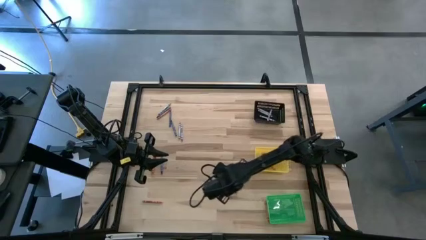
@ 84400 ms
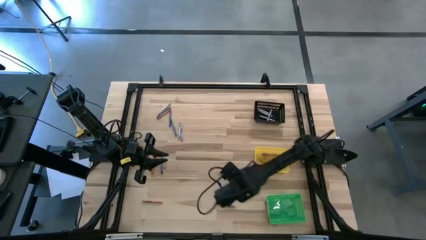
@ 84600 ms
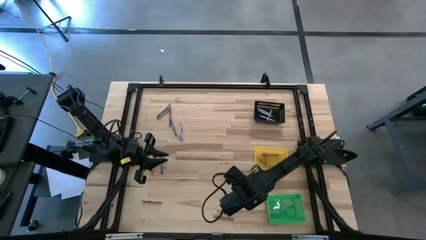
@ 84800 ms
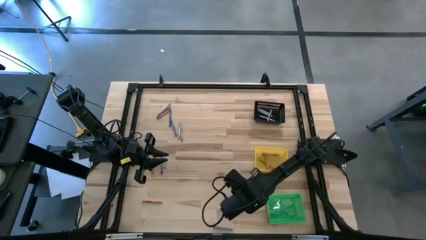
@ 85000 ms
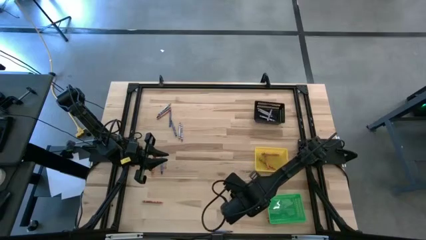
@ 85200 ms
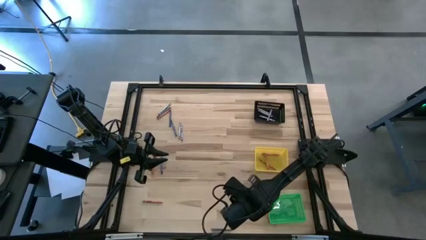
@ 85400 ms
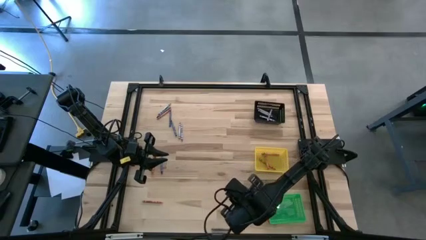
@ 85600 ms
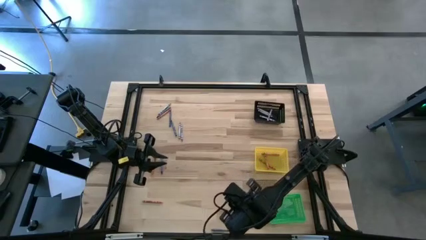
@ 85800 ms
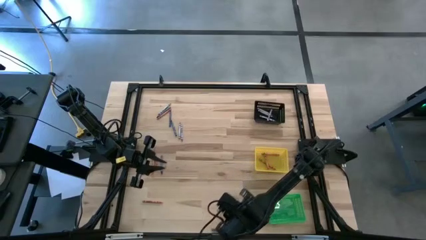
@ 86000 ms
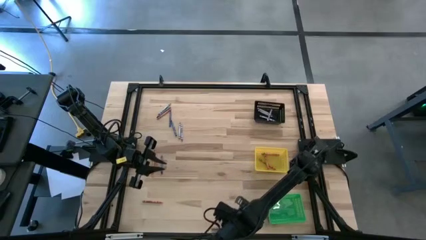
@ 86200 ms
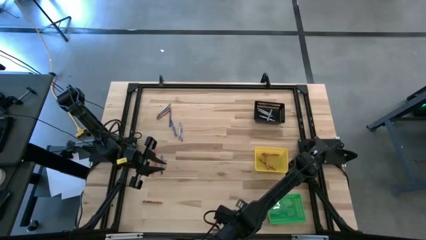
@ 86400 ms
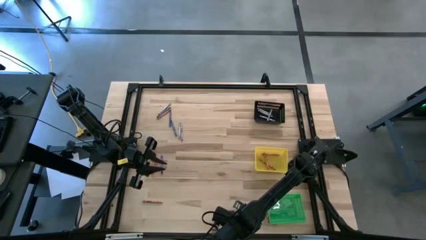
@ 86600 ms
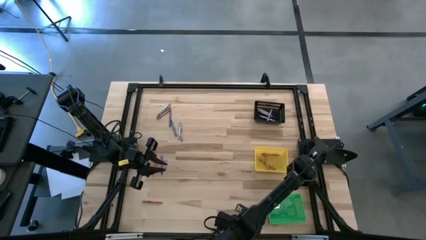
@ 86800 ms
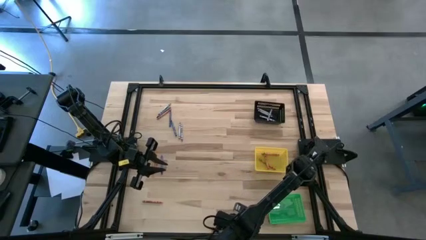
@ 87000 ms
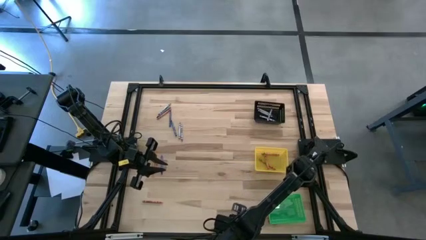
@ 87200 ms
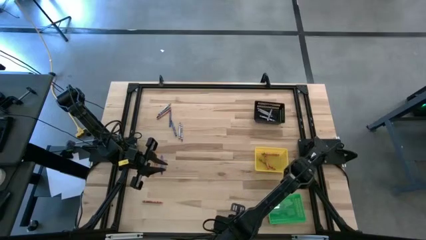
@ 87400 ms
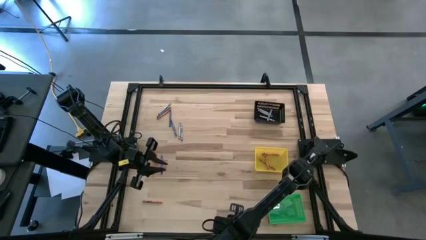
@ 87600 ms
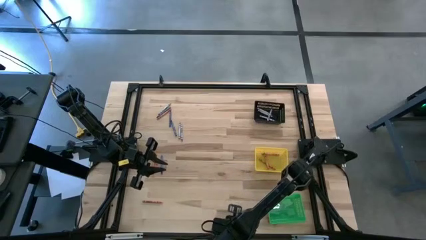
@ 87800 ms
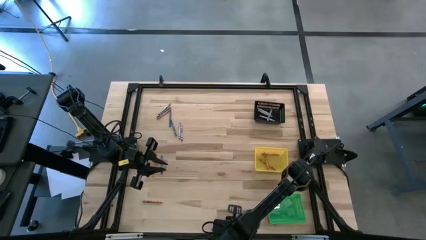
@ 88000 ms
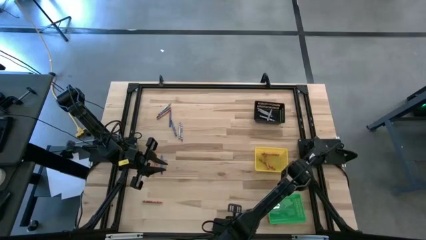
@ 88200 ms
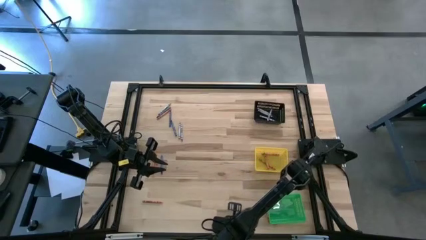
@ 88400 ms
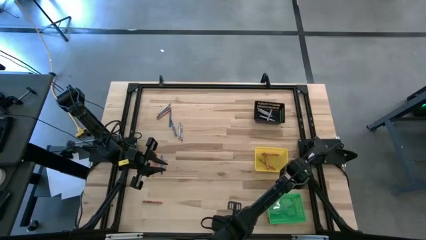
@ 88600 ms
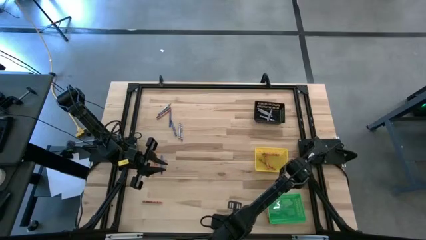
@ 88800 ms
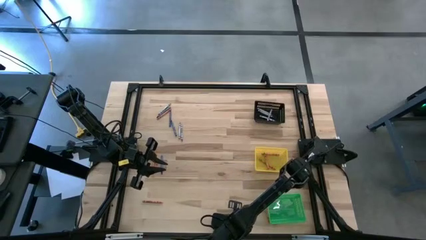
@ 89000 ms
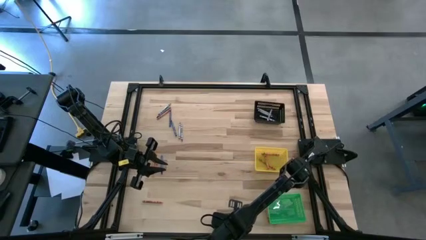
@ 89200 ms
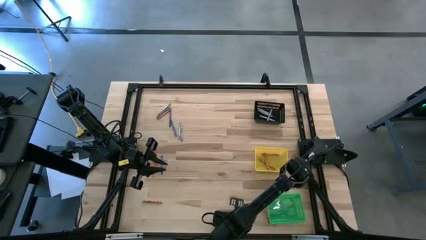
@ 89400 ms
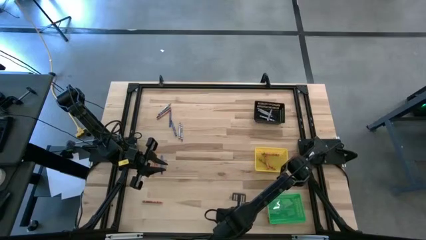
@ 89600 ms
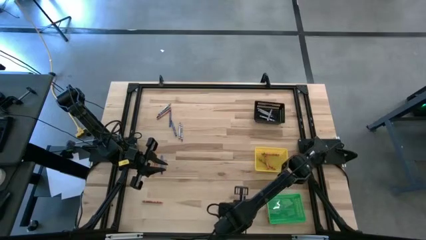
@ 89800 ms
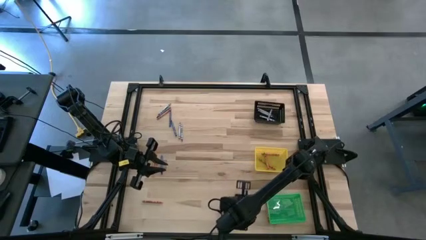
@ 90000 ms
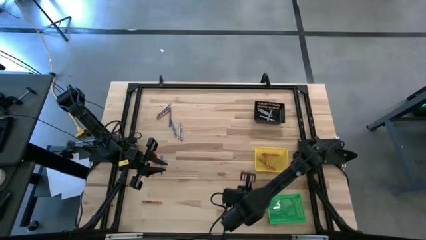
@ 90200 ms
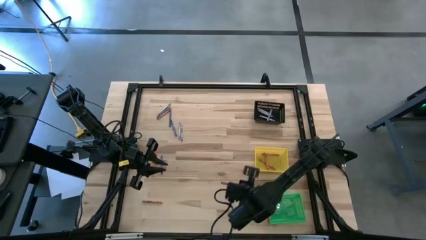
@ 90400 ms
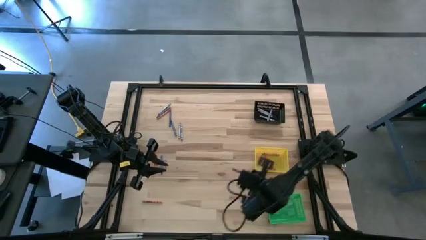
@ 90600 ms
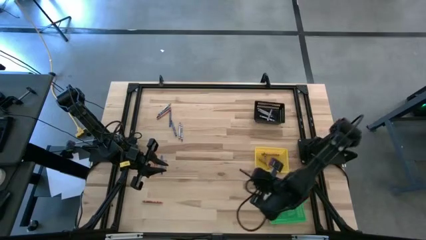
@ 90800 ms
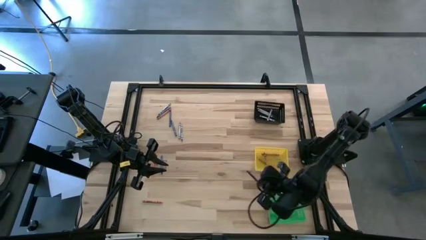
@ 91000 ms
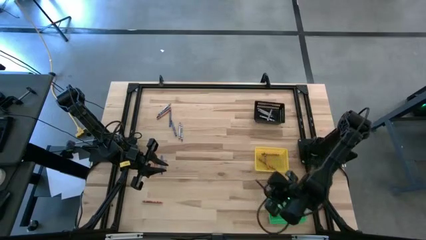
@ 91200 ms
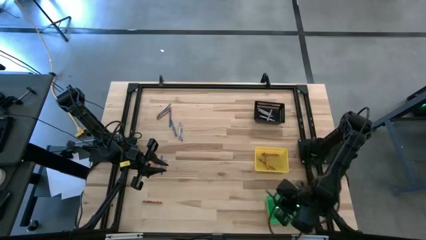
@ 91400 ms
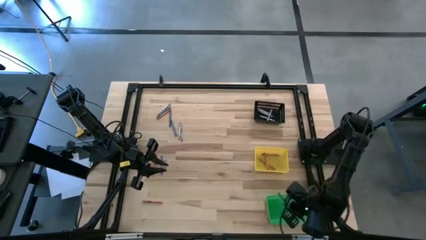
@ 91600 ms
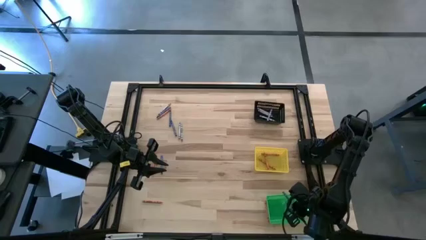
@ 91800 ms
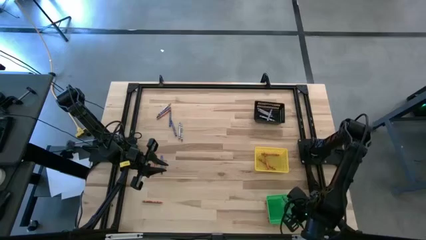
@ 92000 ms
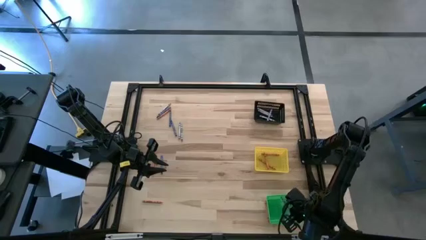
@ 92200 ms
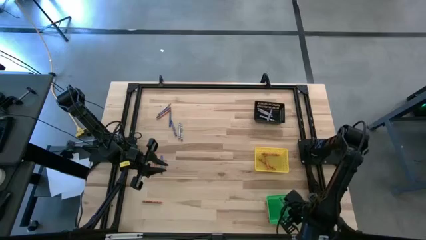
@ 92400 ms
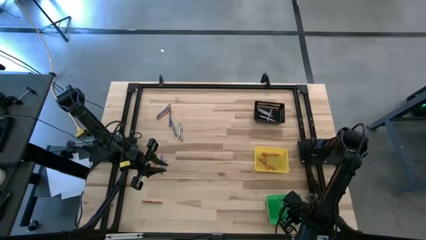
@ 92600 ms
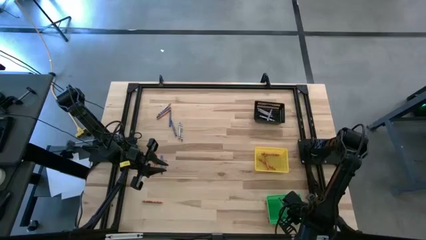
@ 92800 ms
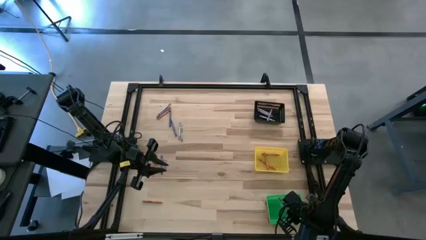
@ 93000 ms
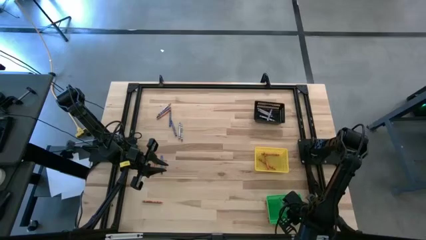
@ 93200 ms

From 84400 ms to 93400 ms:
Task: Sort crayons
Put the blue crayon into the green basket

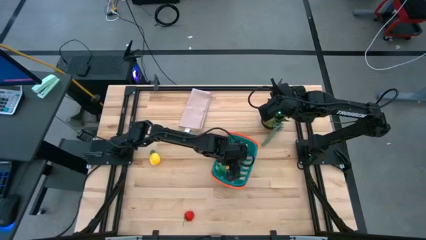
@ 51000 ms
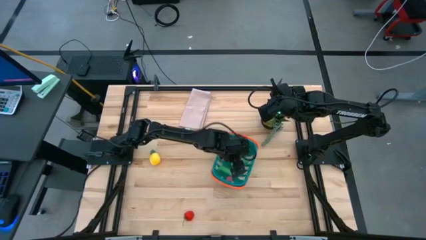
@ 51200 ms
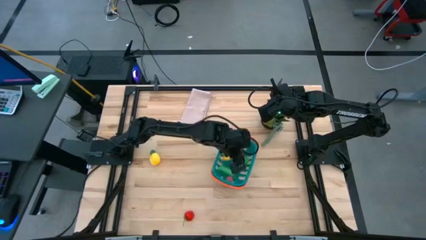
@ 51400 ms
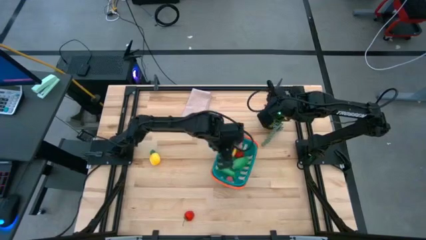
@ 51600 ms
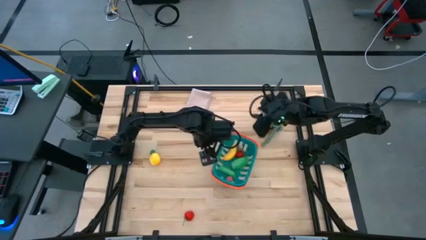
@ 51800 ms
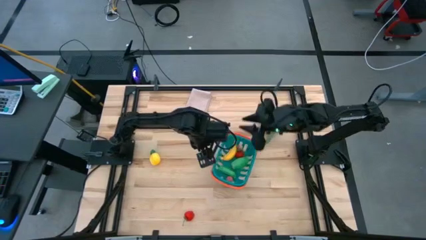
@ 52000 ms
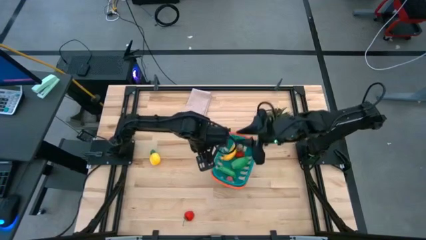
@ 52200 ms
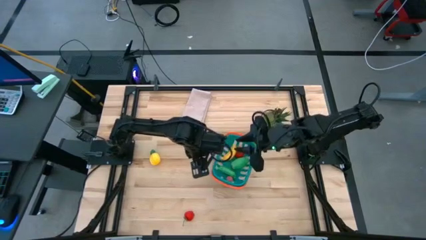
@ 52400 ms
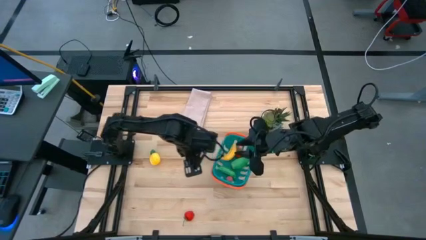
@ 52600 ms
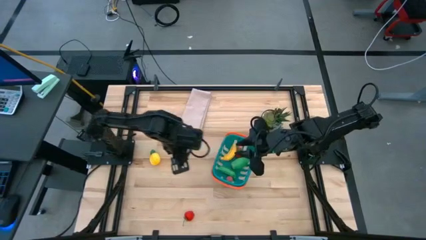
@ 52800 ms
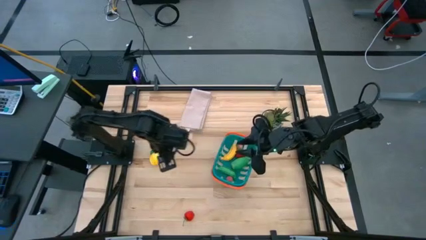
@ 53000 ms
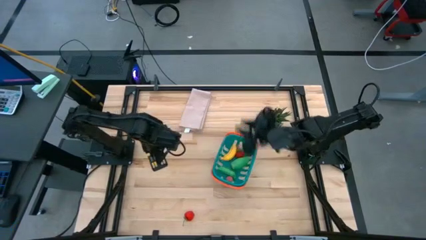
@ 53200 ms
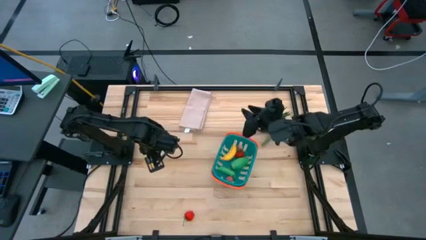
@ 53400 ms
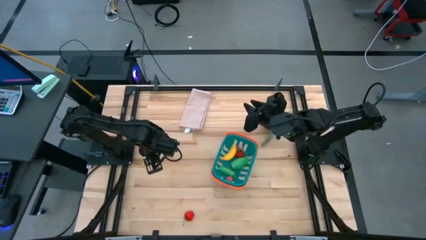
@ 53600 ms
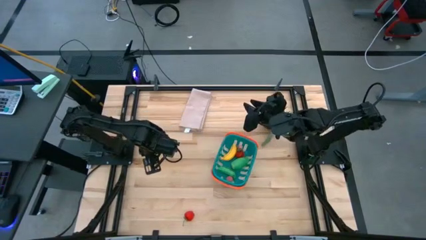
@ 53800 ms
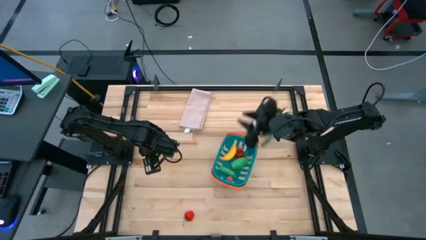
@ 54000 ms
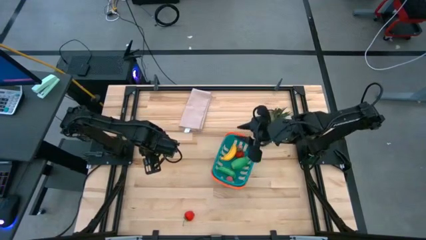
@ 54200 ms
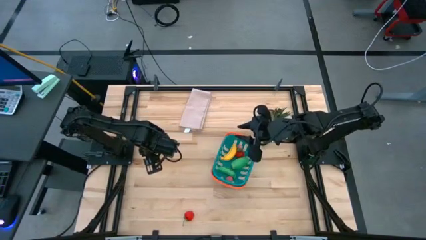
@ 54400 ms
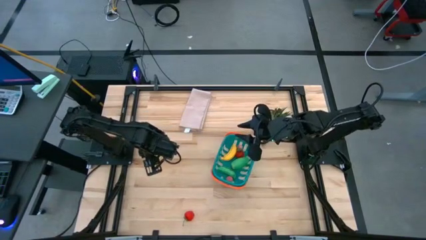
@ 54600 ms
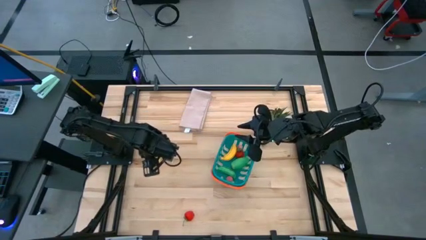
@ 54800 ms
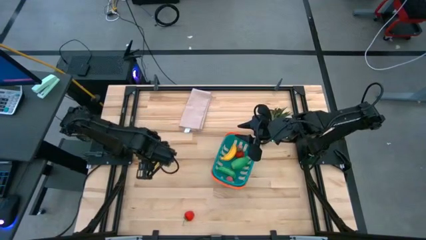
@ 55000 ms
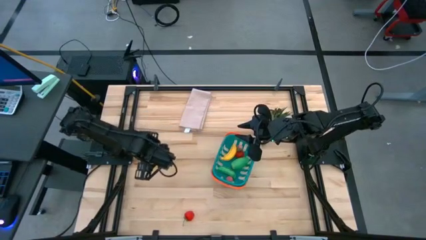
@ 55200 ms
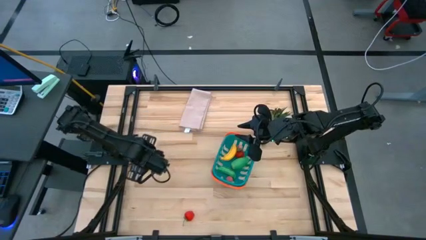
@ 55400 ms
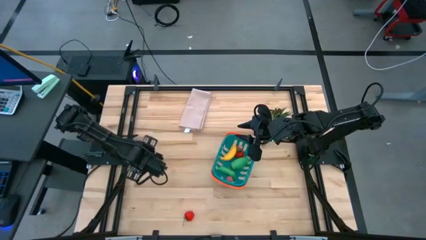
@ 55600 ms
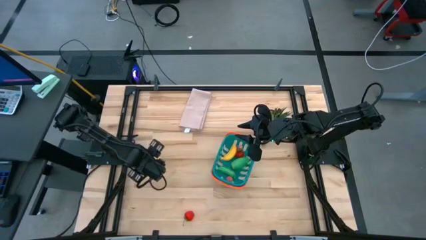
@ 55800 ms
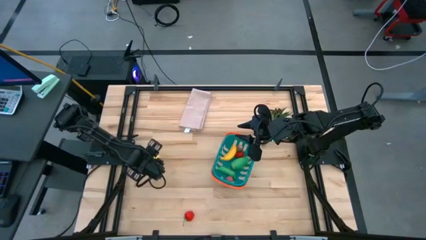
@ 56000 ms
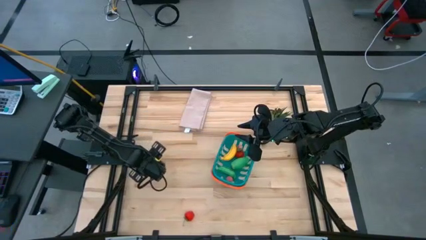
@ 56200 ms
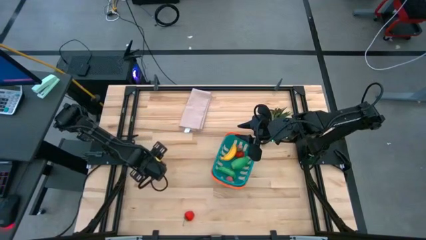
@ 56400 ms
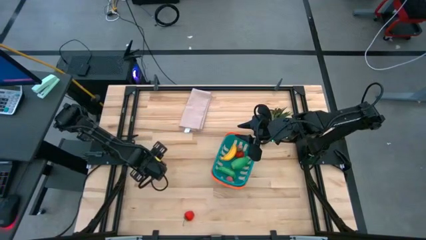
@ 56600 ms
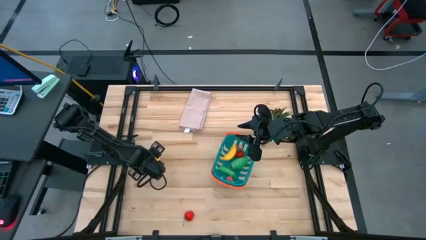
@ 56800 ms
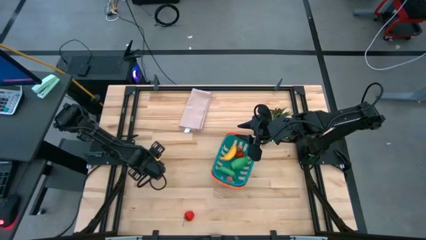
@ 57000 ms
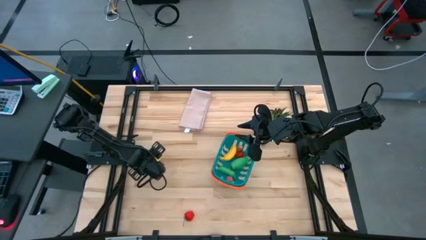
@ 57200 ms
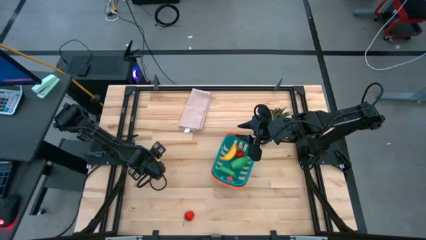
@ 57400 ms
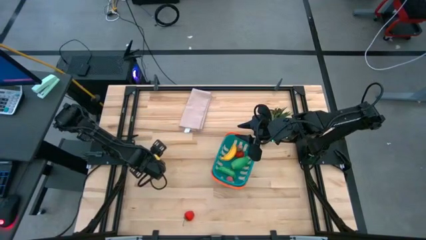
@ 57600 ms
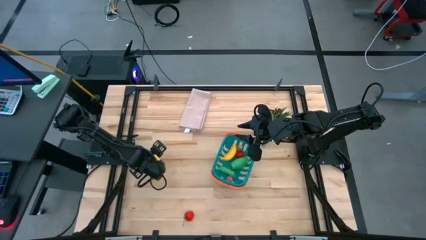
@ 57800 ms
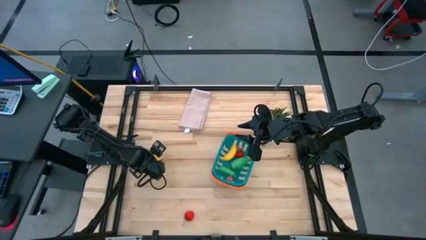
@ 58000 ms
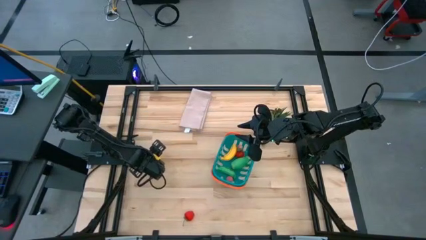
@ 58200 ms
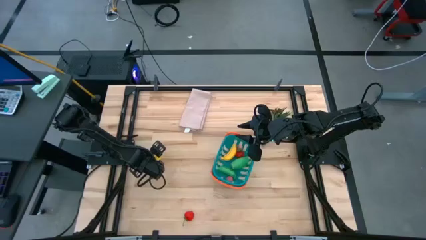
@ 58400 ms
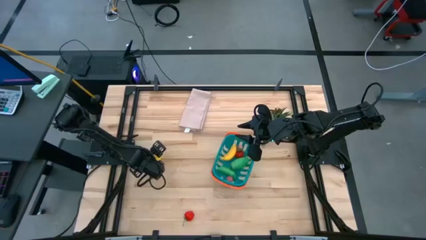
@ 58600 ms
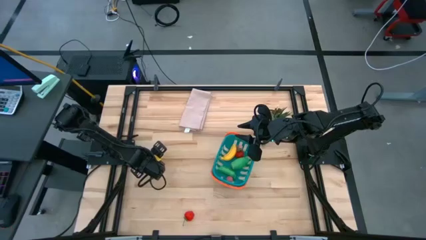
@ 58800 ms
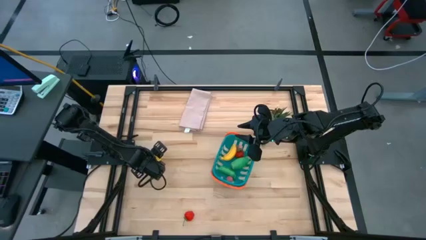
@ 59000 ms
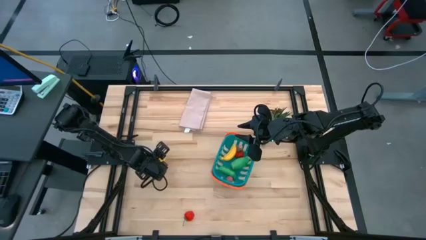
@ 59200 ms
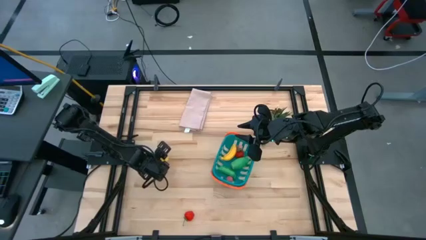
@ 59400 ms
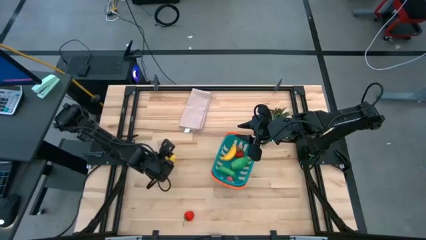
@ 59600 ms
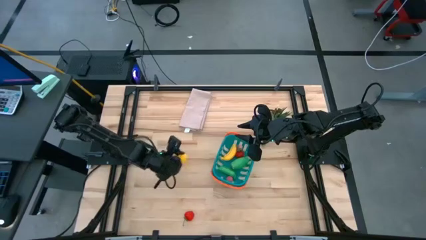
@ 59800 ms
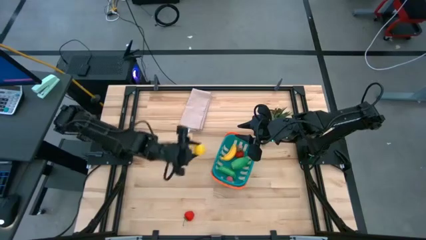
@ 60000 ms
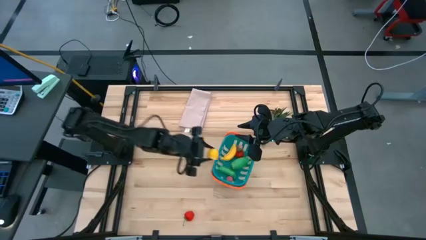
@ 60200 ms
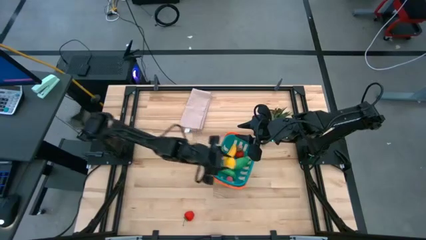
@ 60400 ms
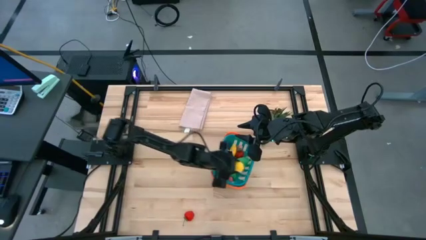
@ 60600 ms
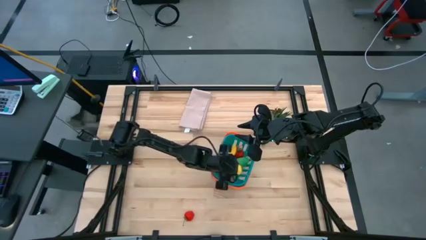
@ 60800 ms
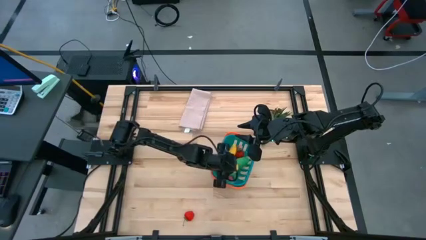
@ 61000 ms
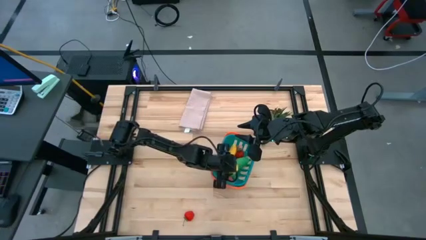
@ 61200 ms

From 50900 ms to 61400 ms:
Task: Pick and placing Produce into tupperware
Put the yellow pineapple into the blue basket
